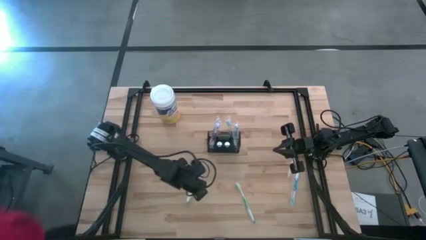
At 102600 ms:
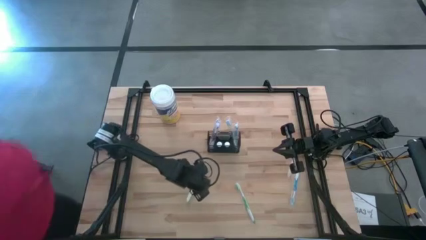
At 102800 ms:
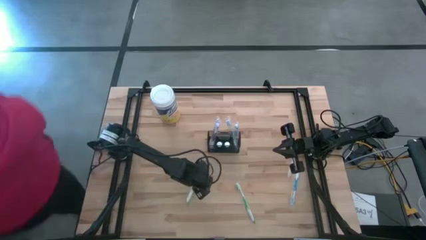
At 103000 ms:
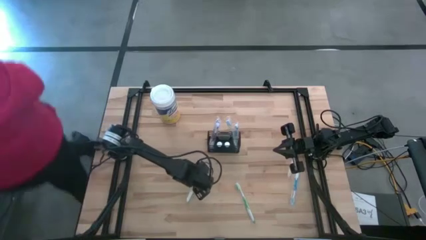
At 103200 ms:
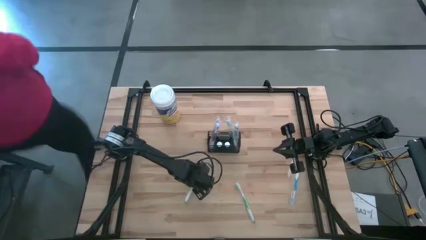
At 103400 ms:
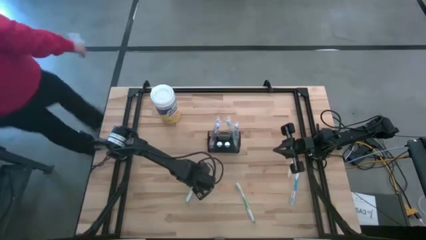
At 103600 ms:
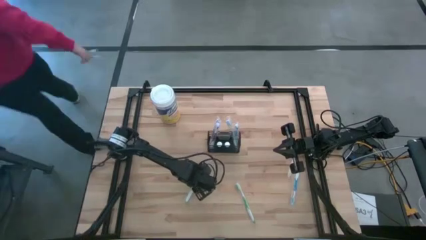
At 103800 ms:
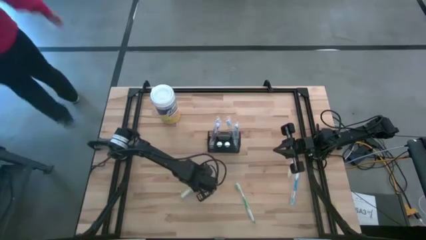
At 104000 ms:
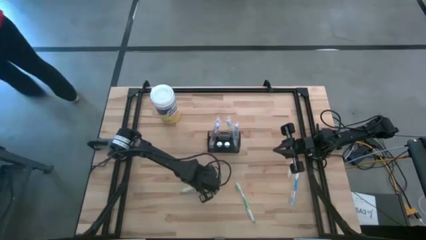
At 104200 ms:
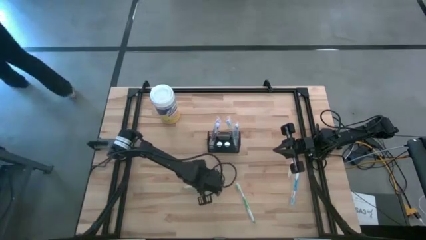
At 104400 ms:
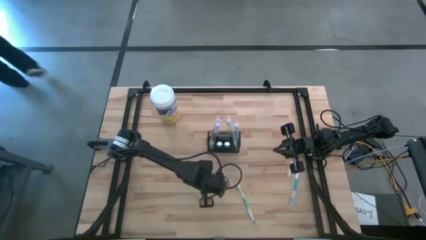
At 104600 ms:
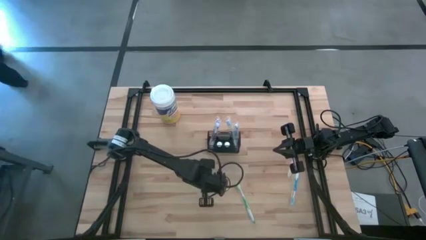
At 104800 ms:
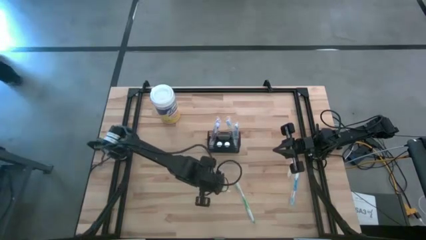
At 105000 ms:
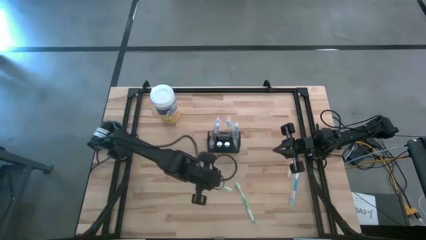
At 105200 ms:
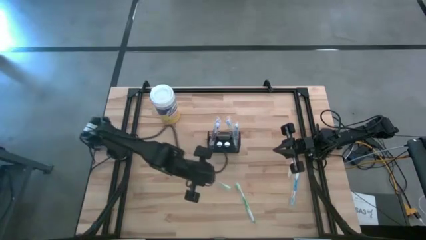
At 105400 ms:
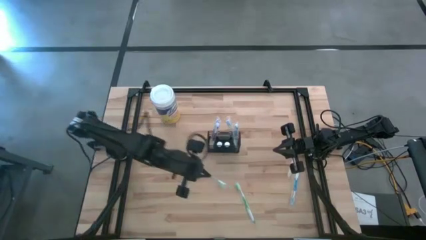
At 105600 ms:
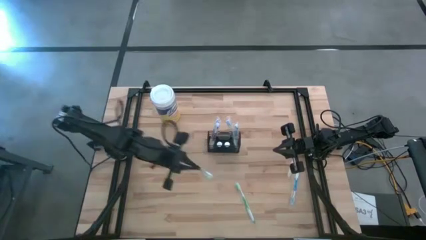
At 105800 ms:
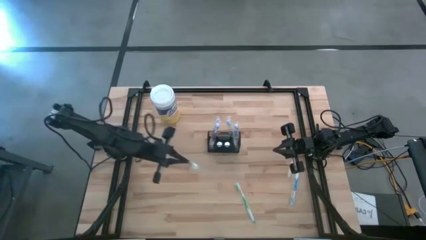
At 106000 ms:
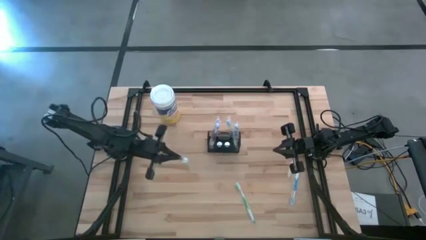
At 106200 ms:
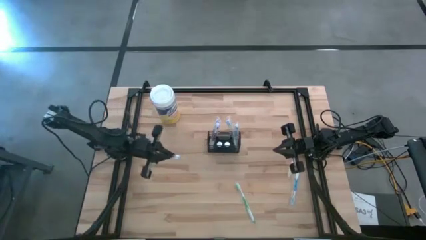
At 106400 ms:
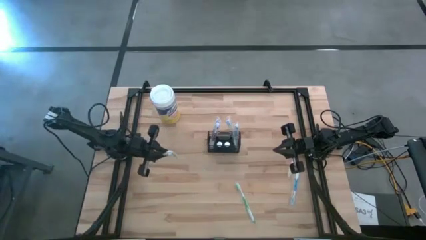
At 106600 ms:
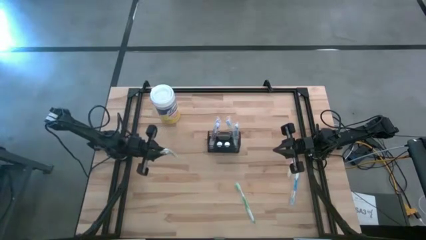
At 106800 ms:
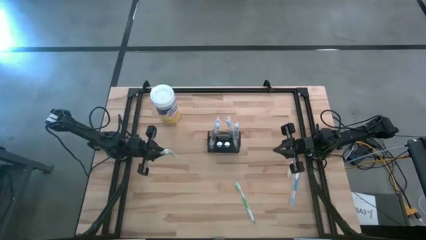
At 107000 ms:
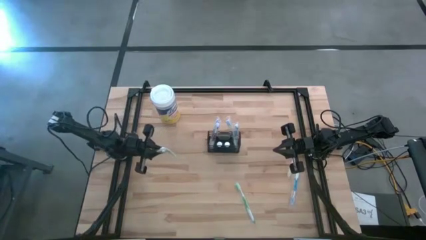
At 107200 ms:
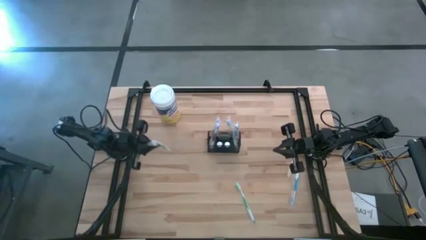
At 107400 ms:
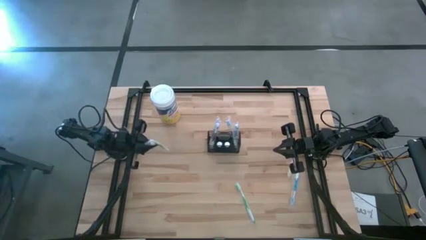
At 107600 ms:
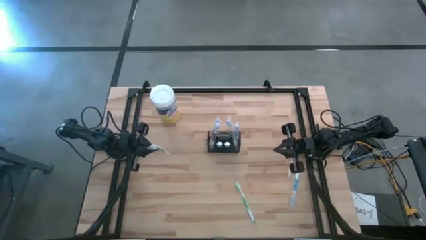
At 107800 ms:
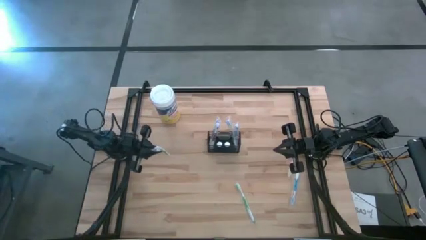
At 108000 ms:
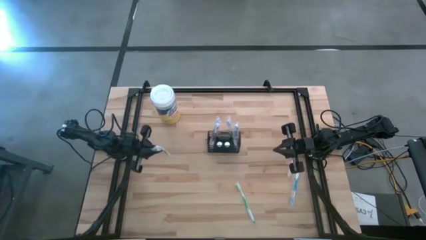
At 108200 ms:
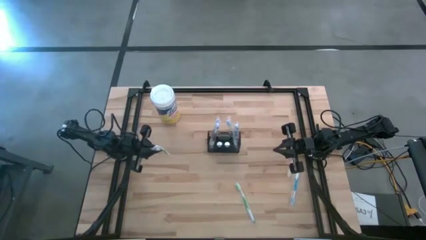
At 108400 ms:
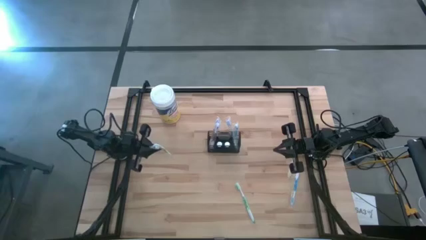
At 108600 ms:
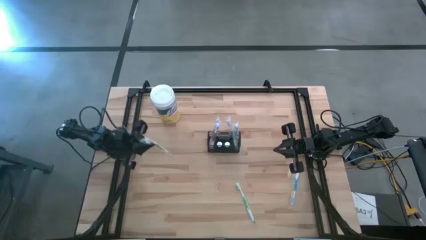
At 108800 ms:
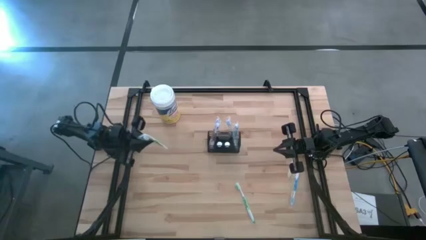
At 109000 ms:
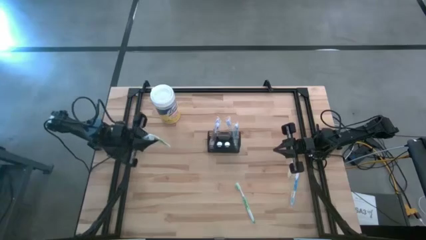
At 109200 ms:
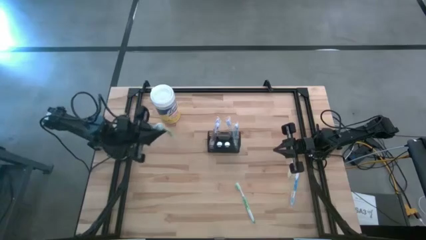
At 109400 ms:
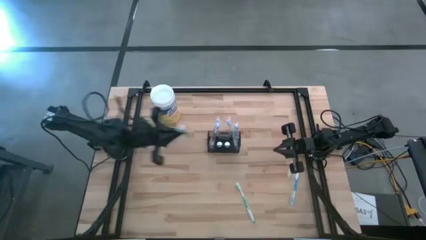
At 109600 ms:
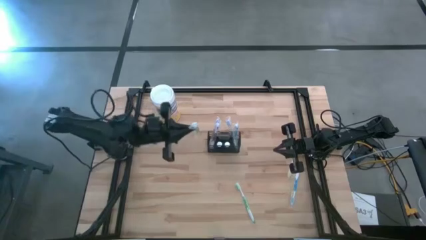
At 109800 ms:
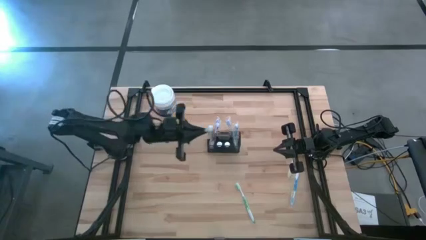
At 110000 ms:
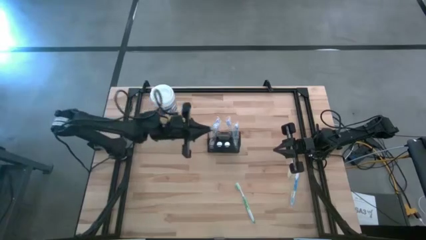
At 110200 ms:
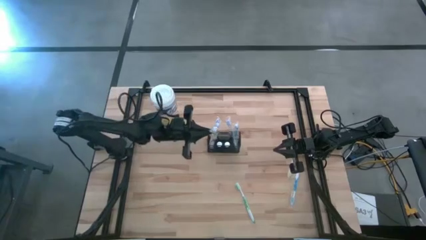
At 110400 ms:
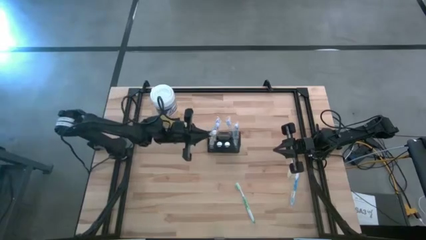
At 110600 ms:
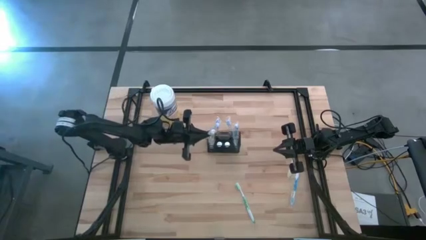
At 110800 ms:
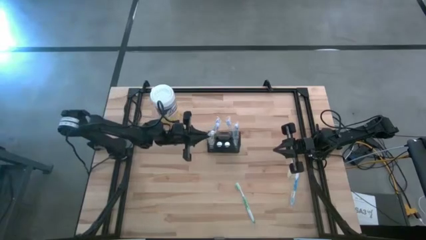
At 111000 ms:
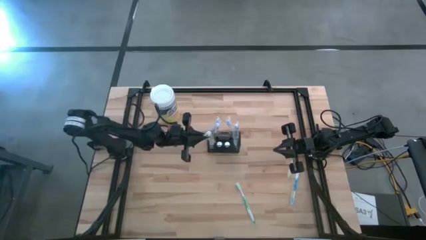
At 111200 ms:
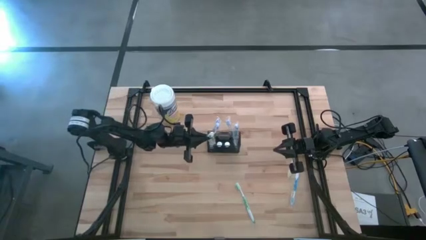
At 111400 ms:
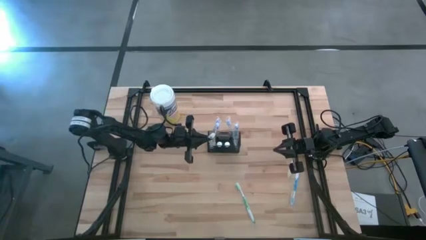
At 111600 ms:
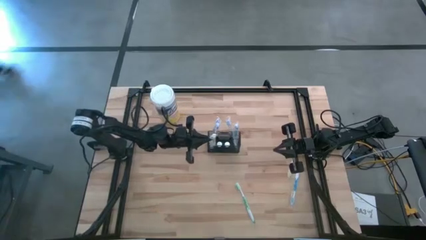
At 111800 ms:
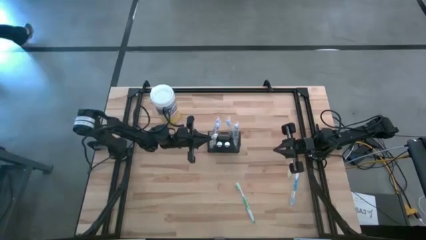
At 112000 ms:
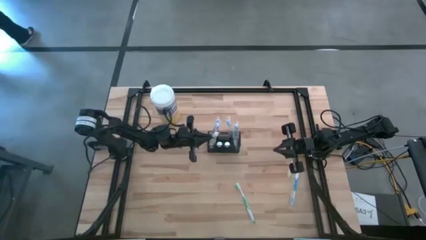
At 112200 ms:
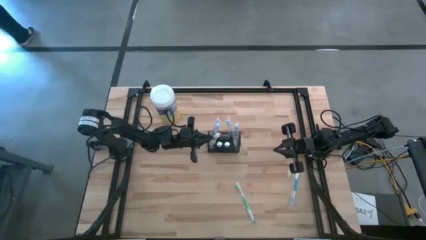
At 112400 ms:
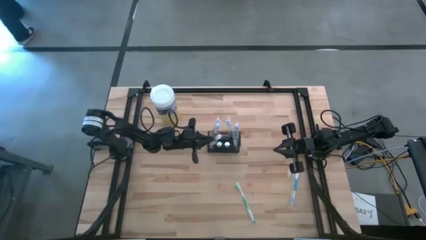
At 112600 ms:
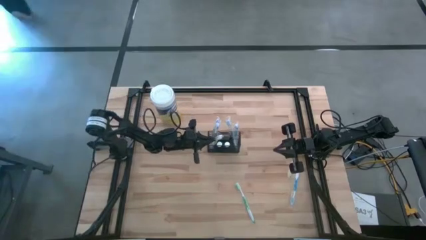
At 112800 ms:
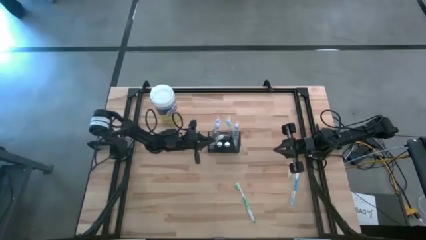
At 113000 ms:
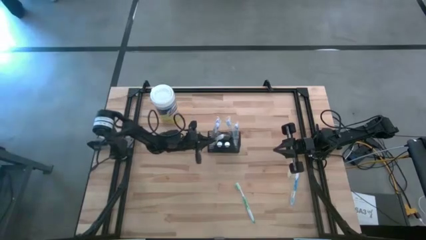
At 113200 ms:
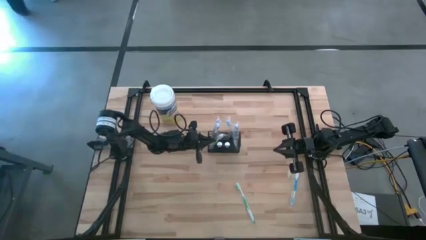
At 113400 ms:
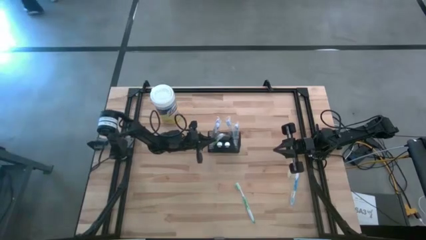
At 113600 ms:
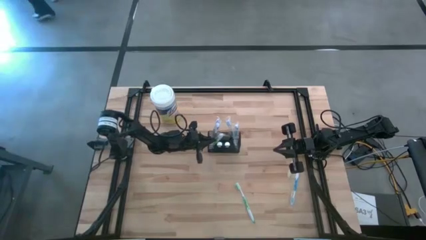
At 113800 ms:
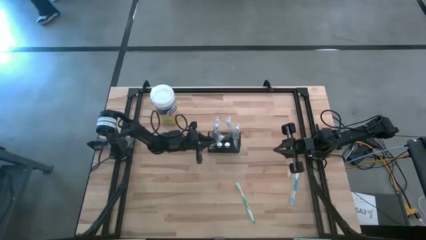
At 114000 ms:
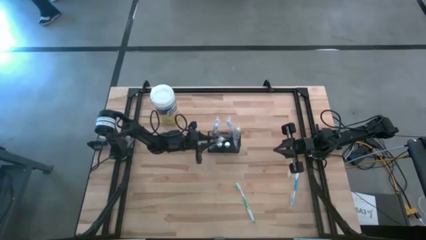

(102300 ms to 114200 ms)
Task: Pick & Place toothbrushing station
Put the left green toothbrush into the wire organizer

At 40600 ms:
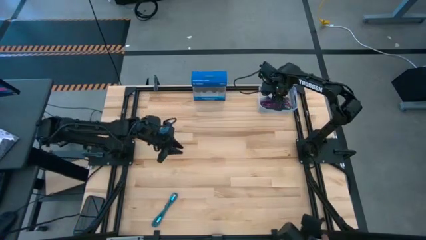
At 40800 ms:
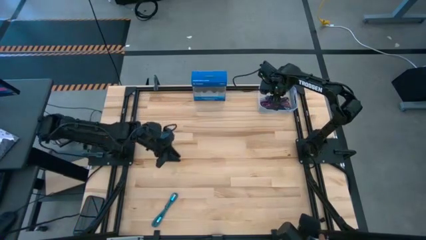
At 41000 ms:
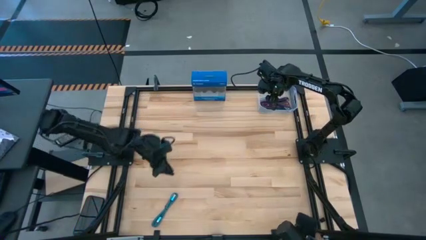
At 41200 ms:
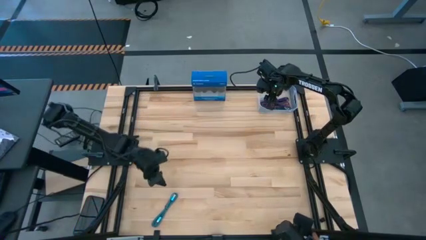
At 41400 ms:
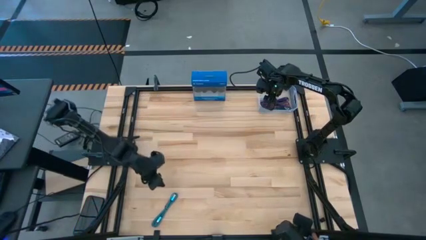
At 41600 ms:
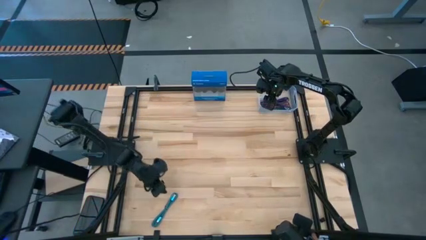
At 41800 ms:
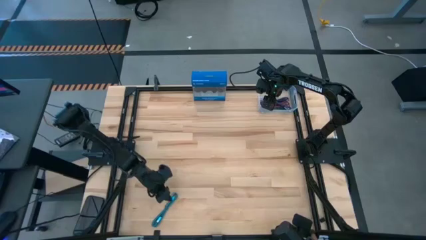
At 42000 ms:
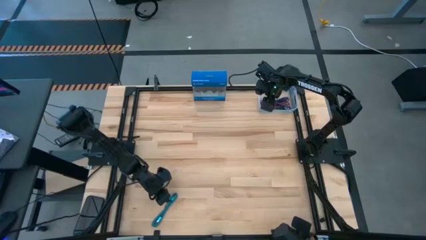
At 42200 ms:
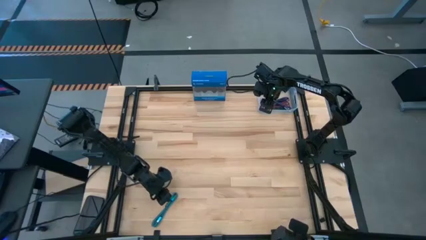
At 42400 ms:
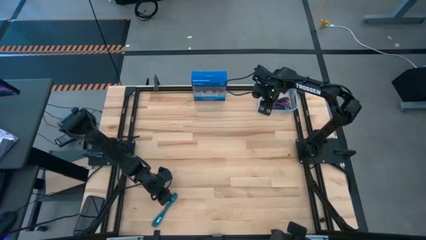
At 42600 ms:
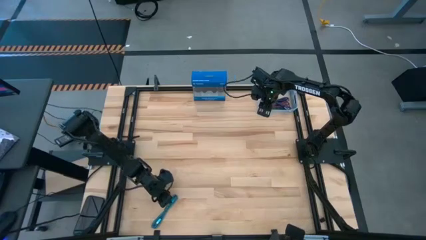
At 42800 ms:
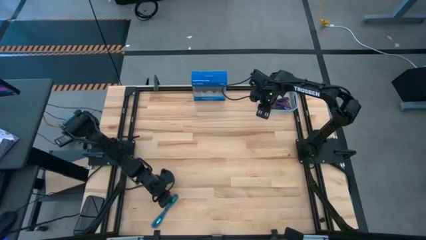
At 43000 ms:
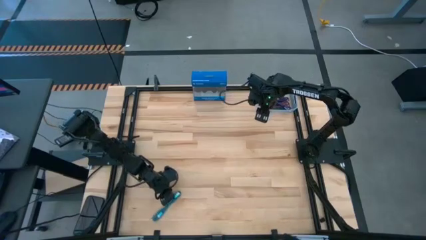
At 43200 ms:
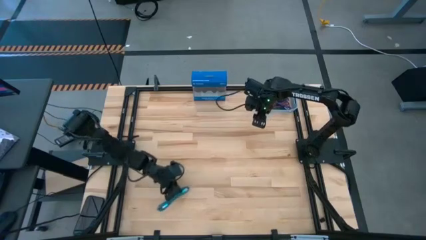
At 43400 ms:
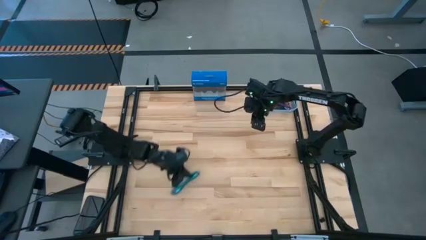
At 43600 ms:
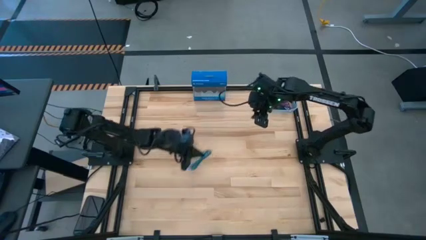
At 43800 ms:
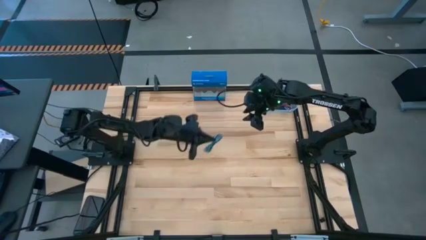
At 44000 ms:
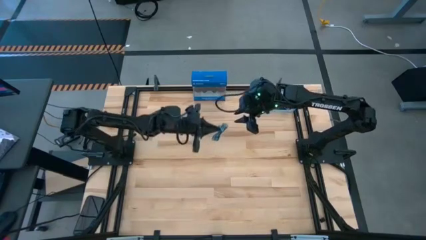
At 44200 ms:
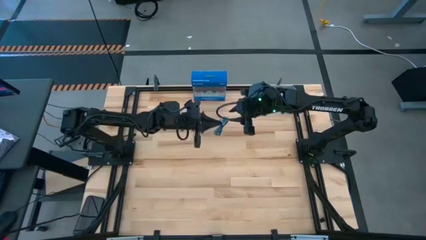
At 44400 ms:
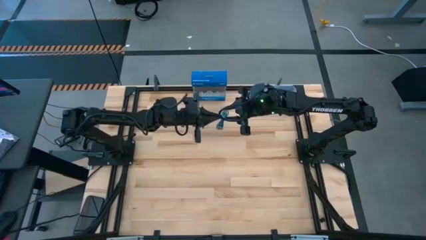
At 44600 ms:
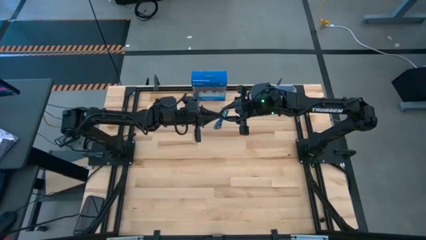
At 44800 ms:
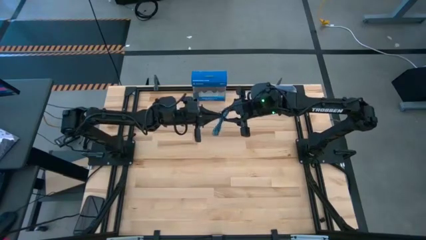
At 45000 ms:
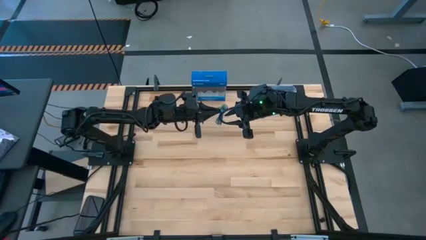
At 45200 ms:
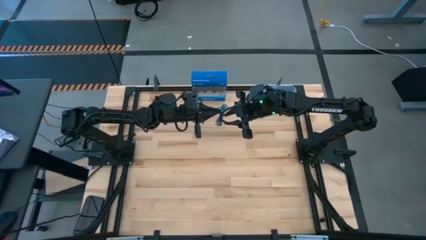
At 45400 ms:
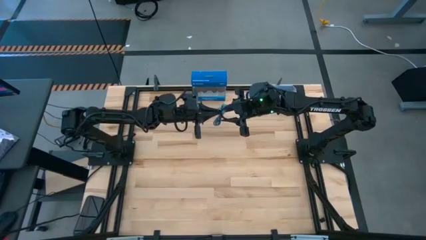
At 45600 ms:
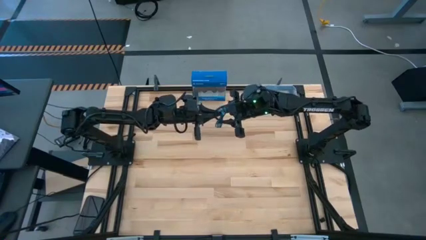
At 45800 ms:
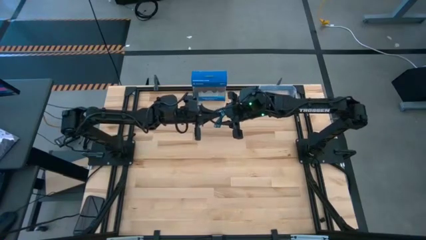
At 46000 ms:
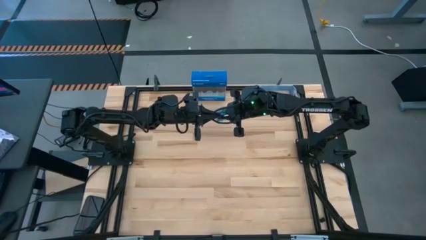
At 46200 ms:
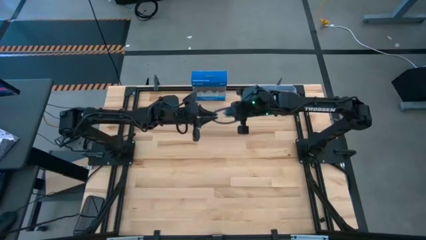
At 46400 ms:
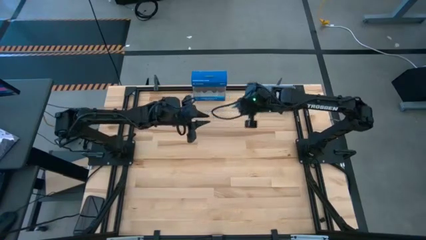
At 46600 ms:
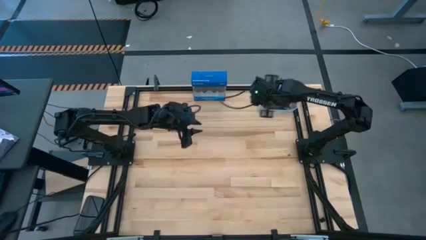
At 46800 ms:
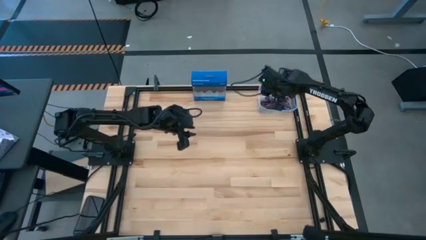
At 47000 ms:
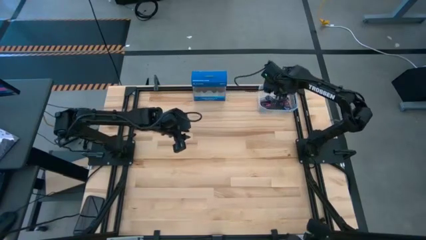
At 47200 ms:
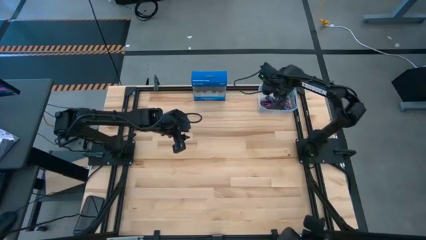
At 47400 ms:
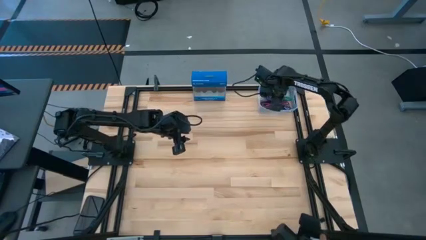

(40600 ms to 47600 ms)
Task: Pick and place USB-C Cables
Put the light blue charger cable into the bin
